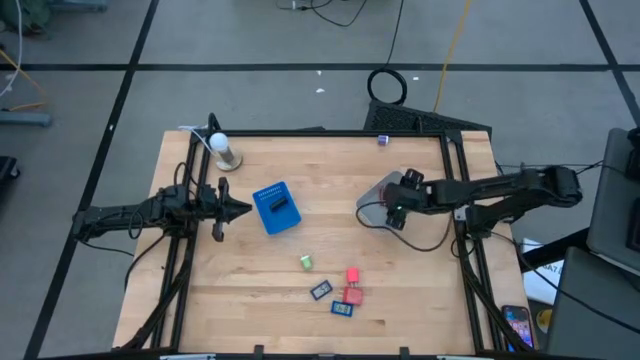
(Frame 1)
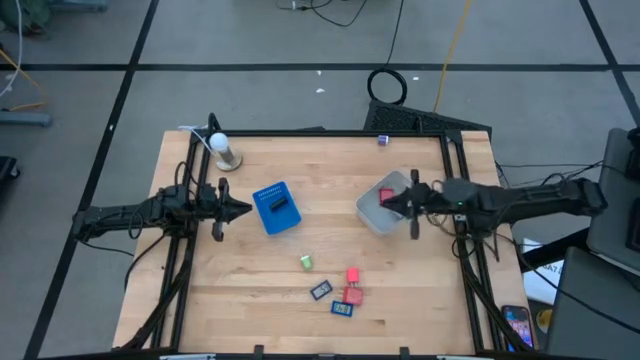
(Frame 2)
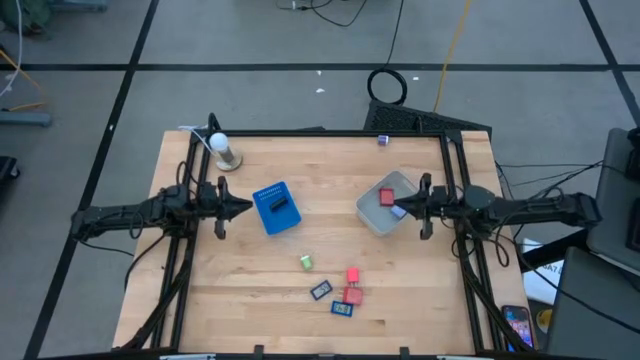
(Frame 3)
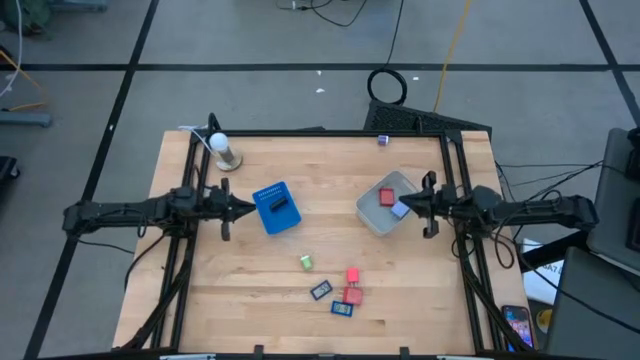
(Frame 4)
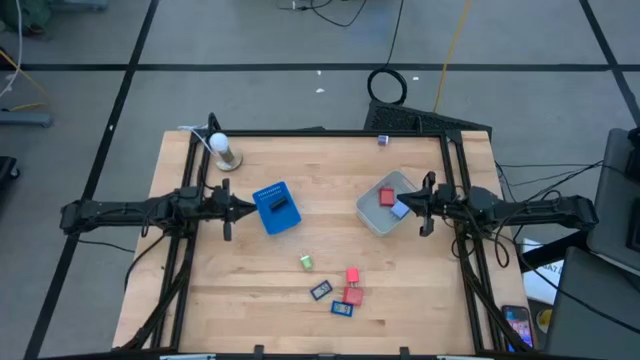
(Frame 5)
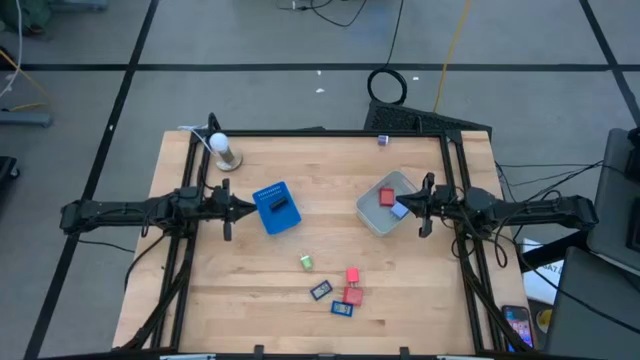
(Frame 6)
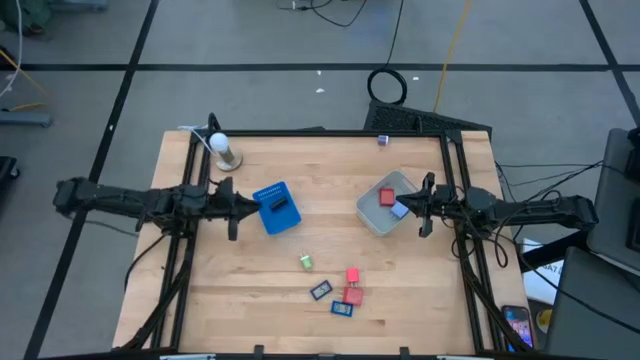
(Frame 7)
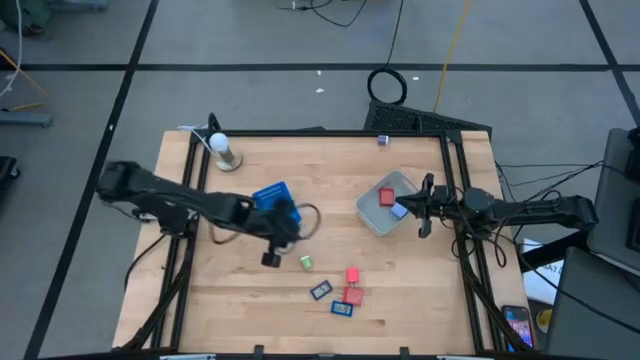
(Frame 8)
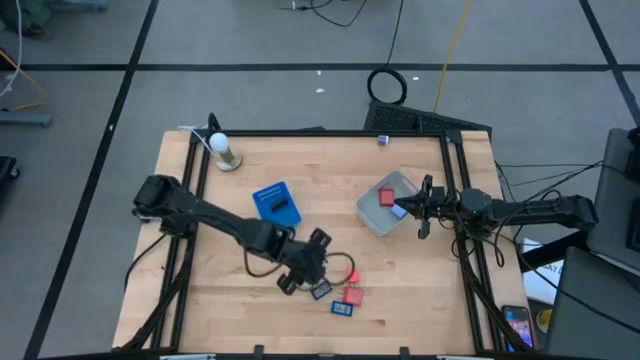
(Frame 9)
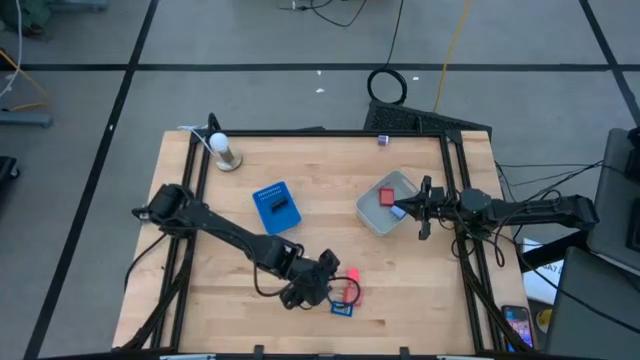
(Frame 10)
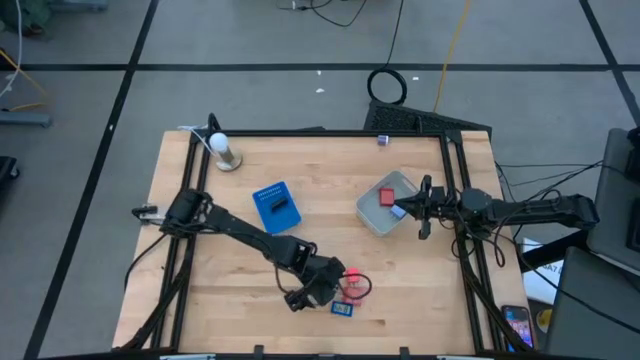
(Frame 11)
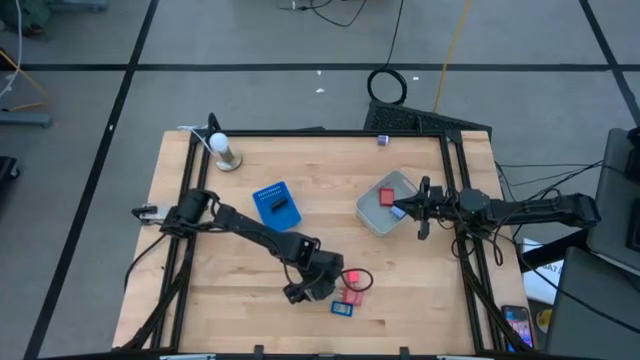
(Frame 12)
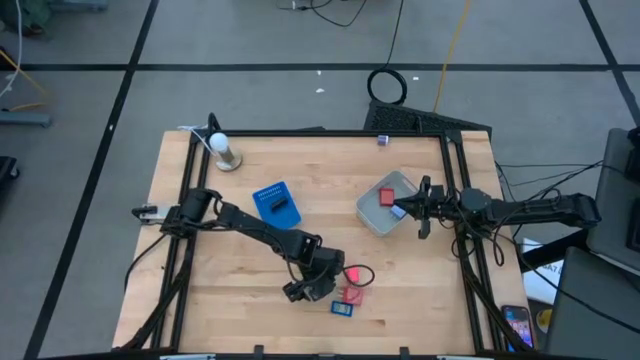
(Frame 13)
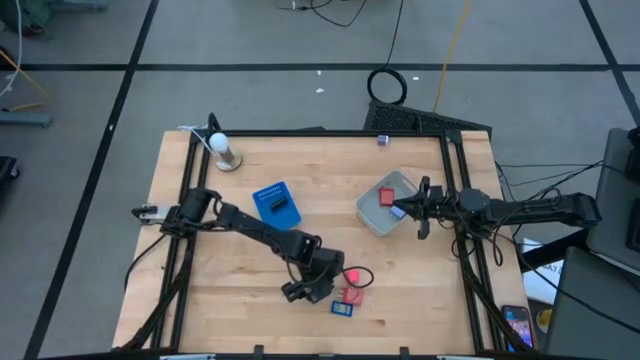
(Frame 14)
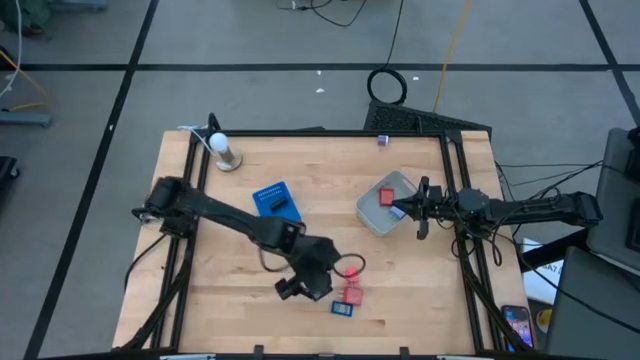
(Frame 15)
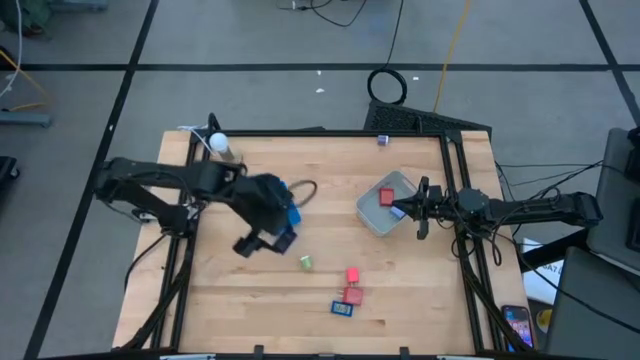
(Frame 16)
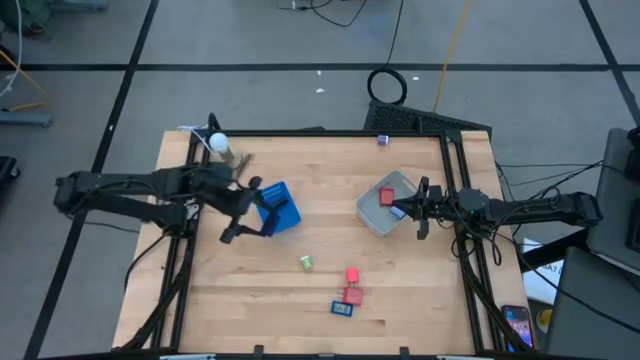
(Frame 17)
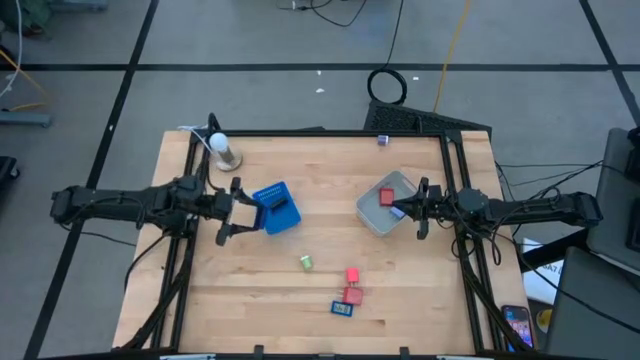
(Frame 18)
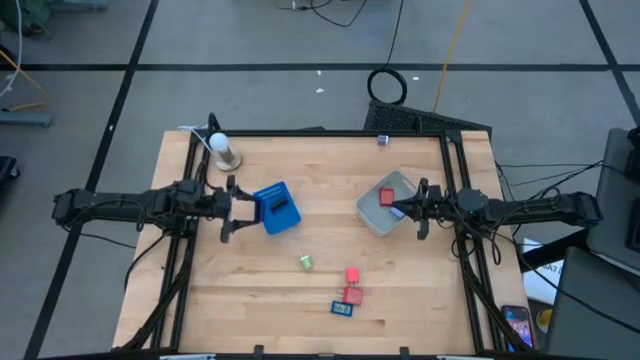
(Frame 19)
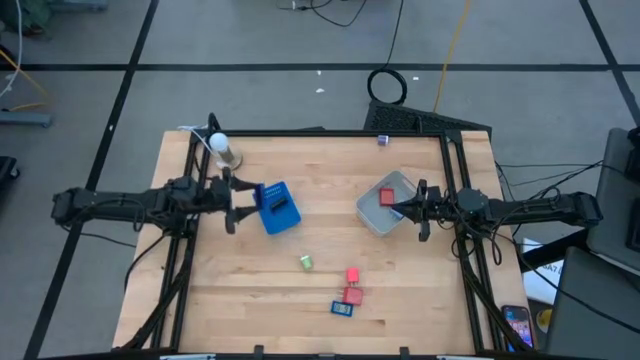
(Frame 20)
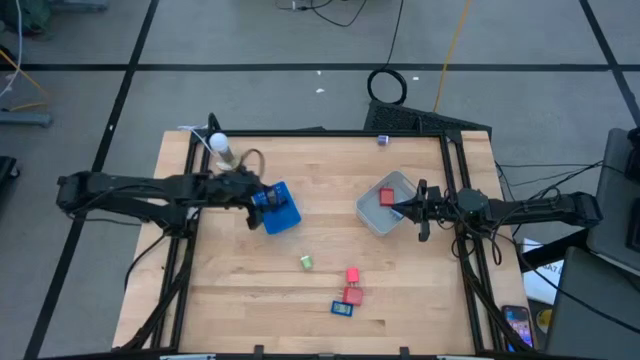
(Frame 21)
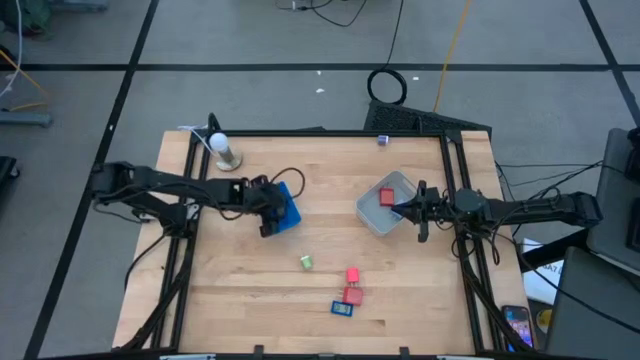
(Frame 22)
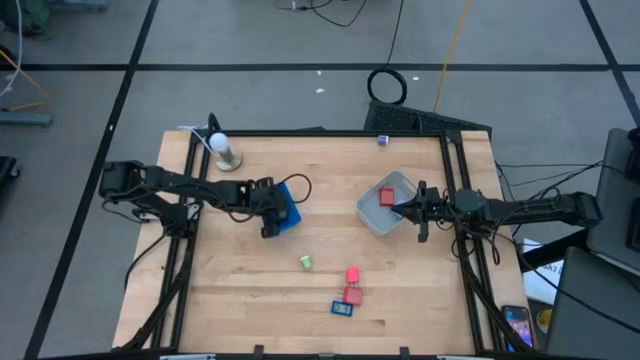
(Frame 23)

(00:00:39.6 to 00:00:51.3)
Task: Pick & Place Office items
Put the top blue digital timer into the blue bin

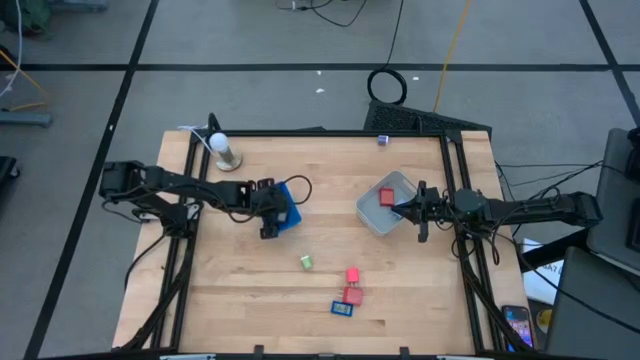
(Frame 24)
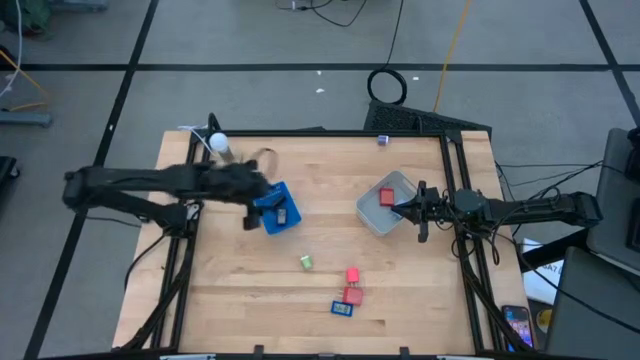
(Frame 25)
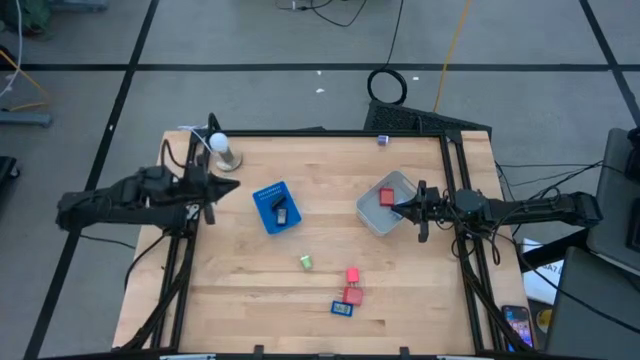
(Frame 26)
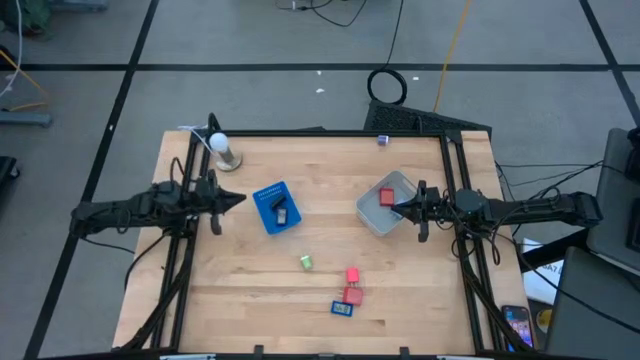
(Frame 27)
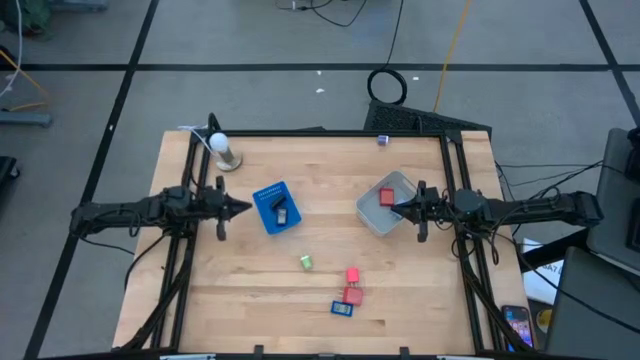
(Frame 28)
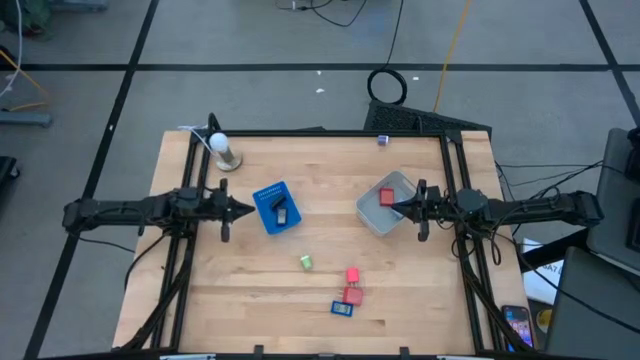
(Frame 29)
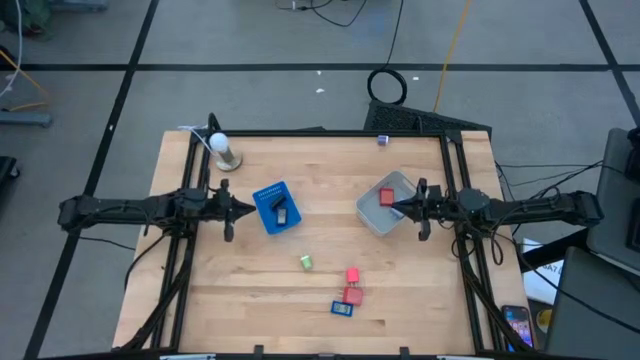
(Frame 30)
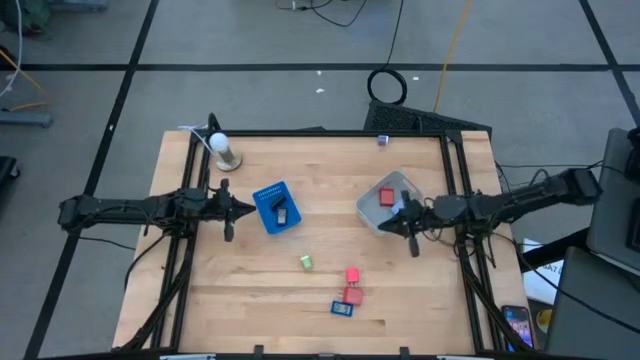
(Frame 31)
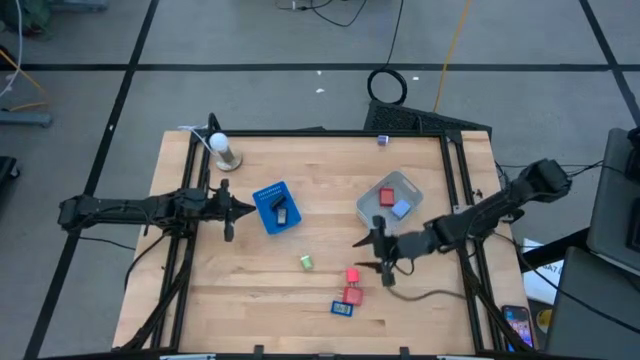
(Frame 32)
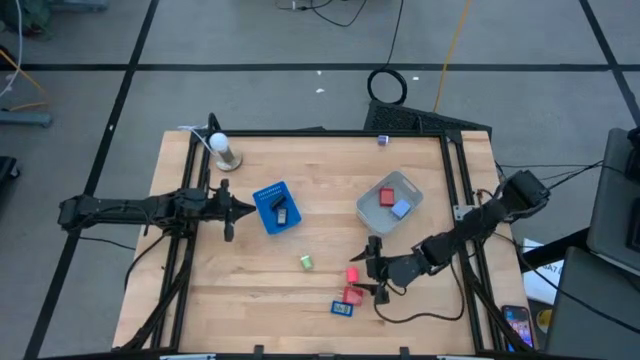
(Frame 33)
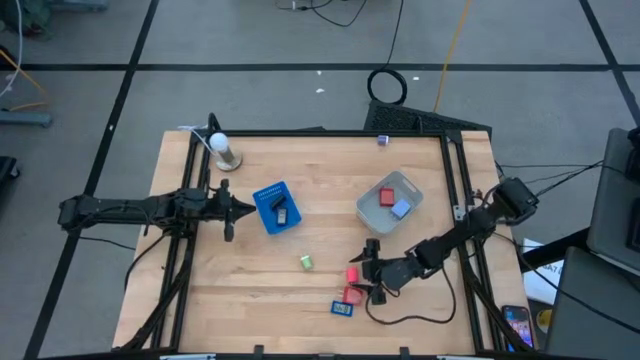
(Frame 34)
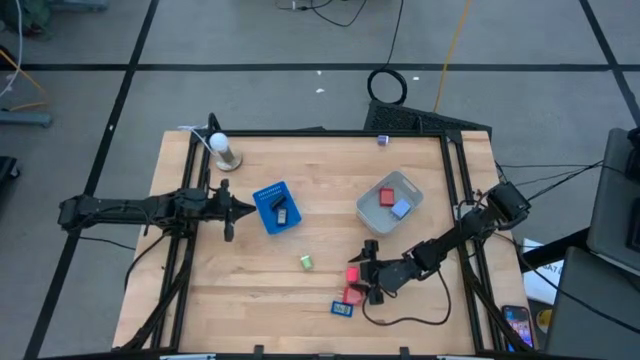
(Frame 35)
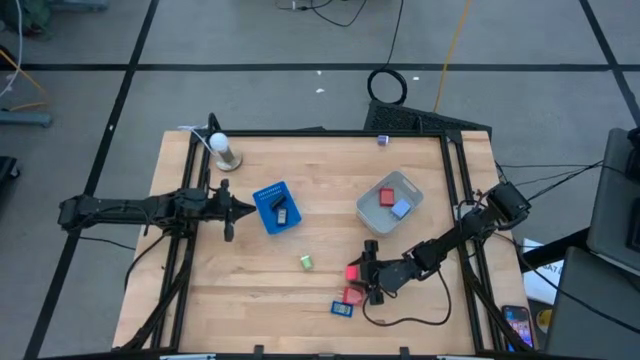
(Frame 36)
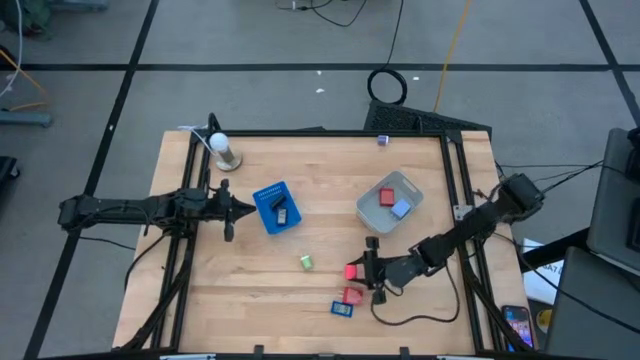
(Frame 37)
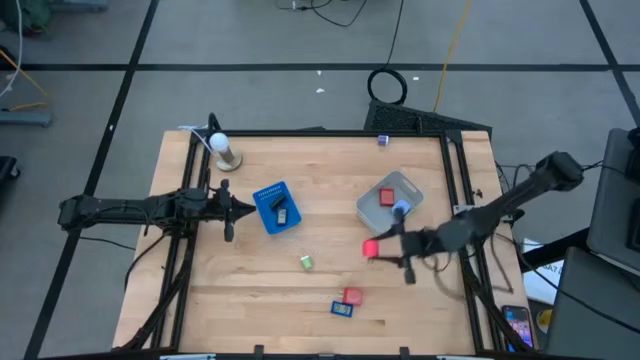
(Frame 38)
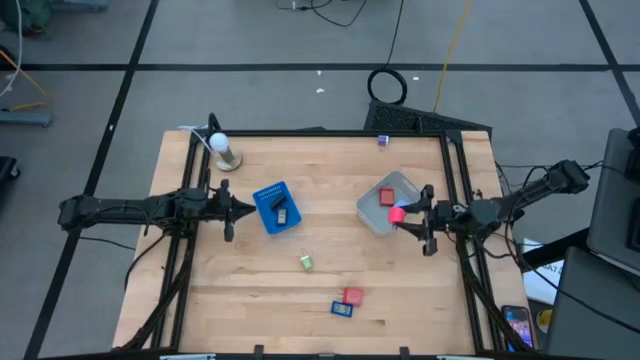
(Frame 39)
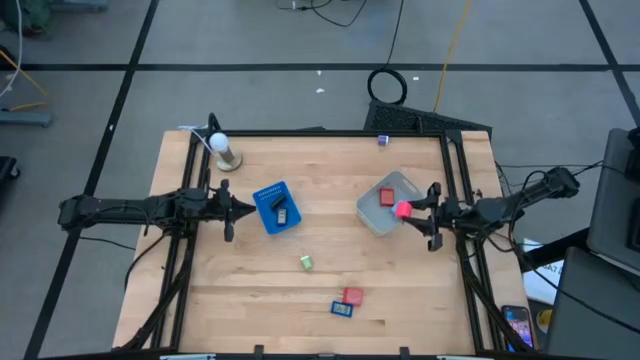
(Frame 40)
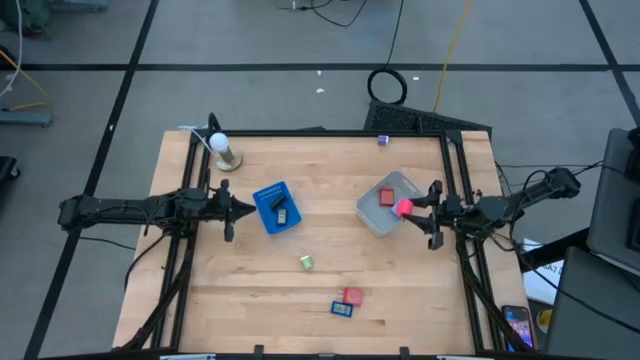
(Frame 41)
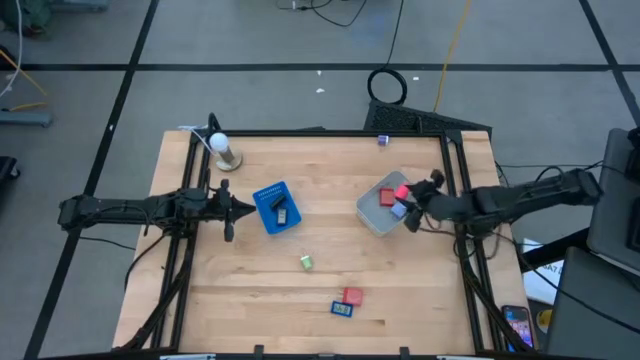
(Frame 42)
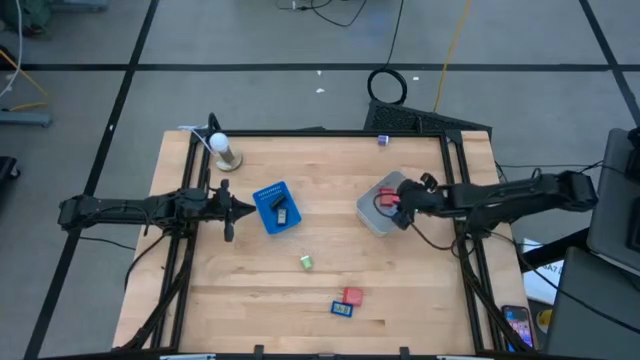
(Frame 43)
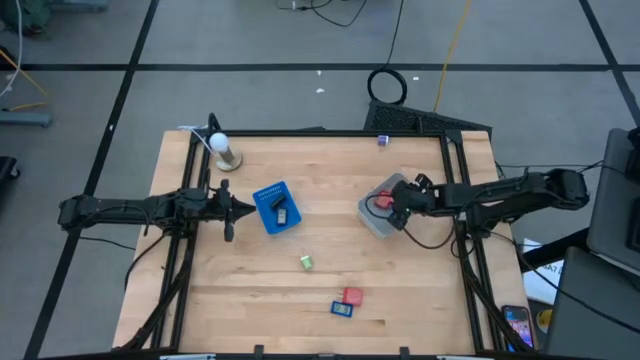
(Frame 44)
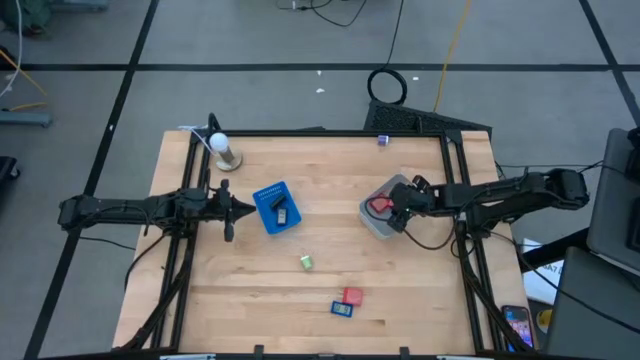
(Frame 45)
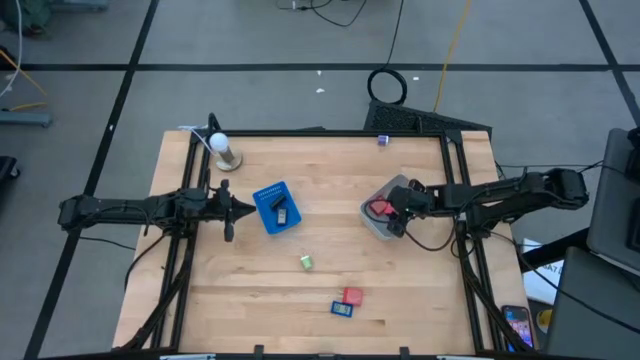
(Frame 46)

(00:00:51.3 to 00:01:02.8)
Put the pink charger adapter into the grey bin
